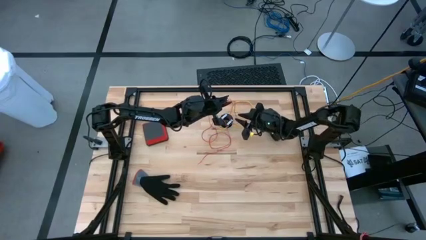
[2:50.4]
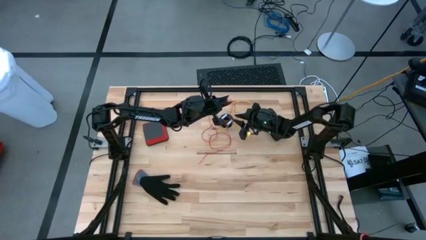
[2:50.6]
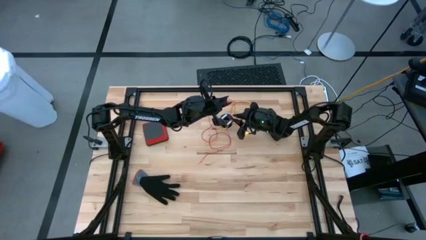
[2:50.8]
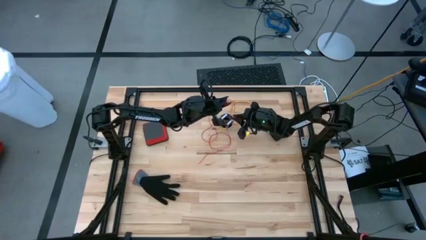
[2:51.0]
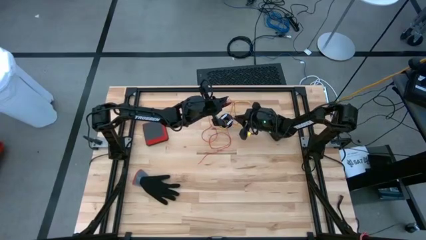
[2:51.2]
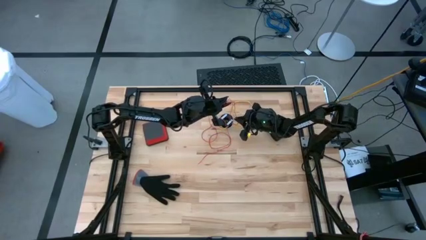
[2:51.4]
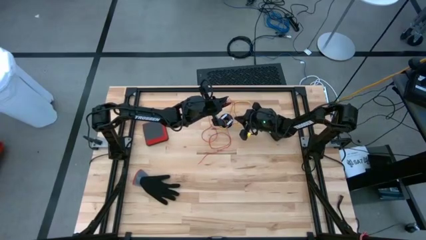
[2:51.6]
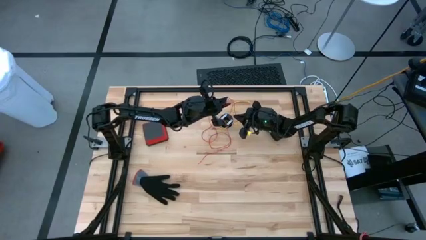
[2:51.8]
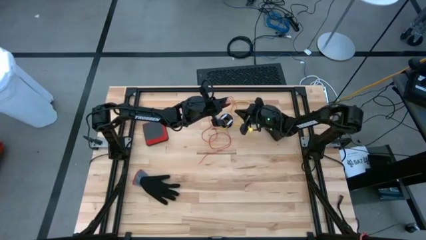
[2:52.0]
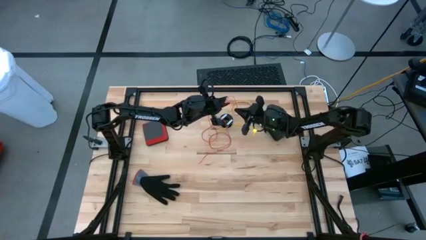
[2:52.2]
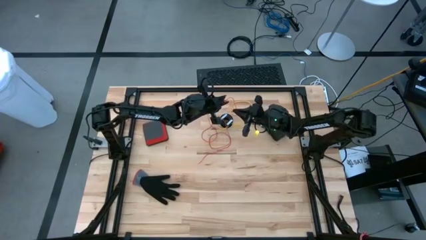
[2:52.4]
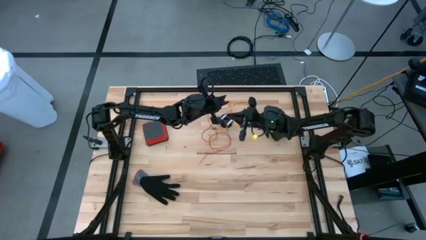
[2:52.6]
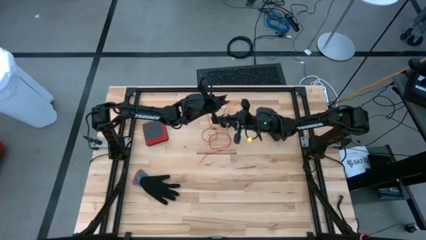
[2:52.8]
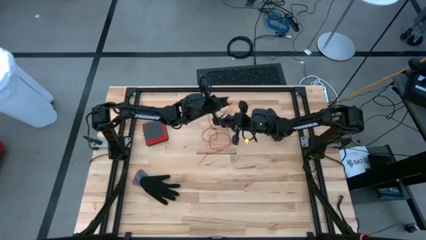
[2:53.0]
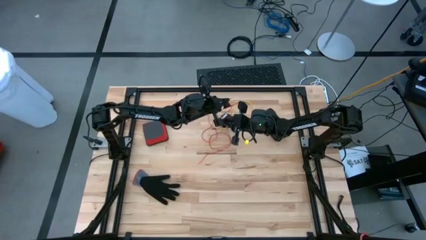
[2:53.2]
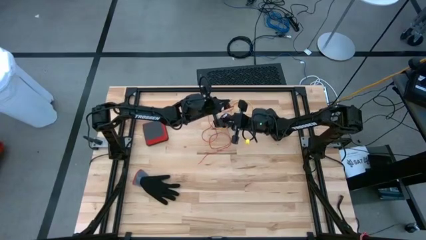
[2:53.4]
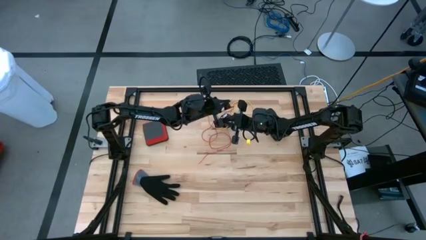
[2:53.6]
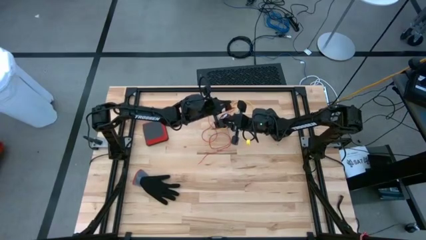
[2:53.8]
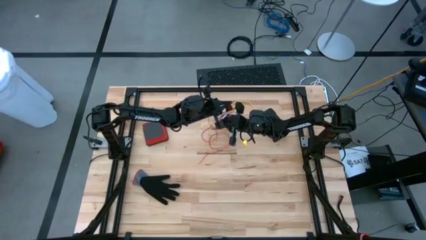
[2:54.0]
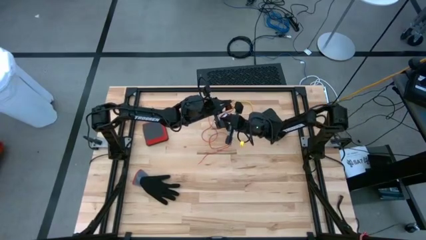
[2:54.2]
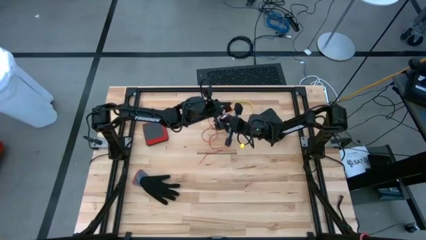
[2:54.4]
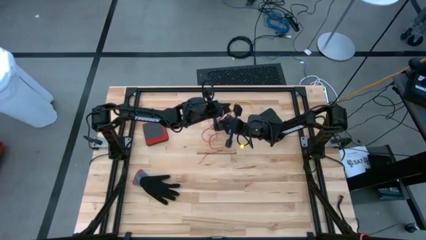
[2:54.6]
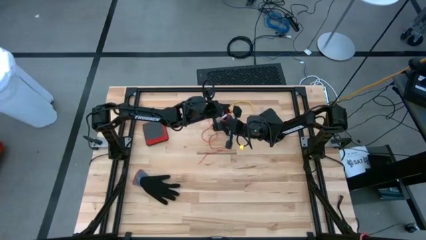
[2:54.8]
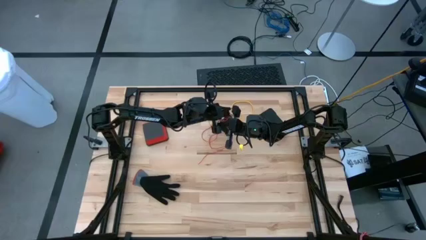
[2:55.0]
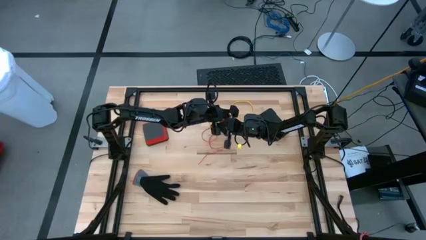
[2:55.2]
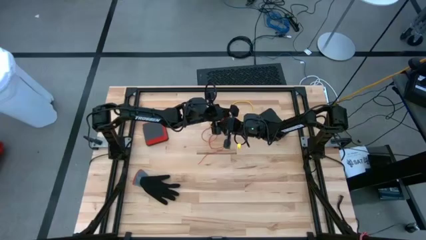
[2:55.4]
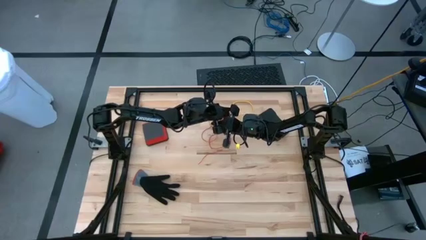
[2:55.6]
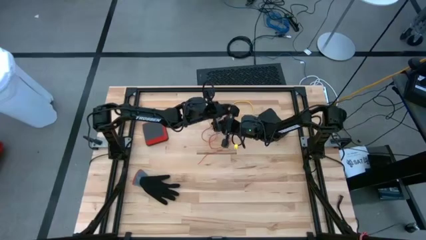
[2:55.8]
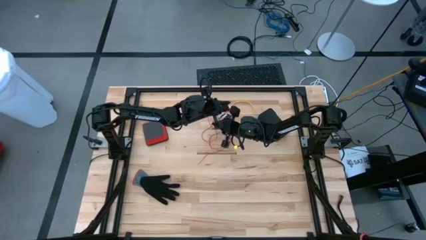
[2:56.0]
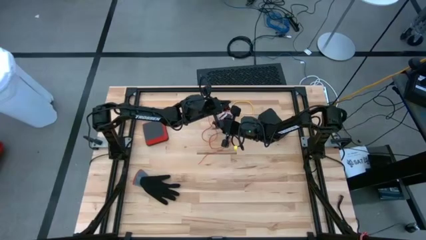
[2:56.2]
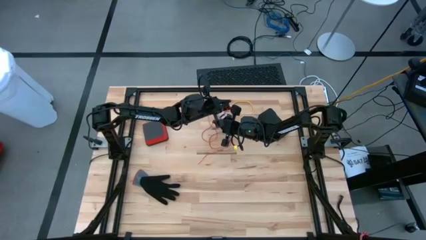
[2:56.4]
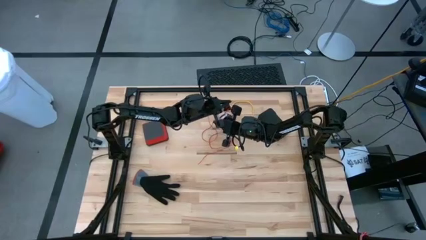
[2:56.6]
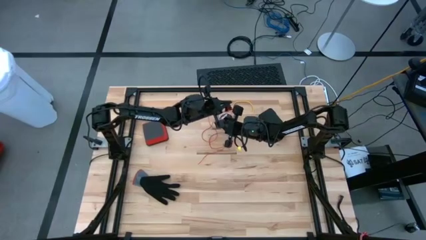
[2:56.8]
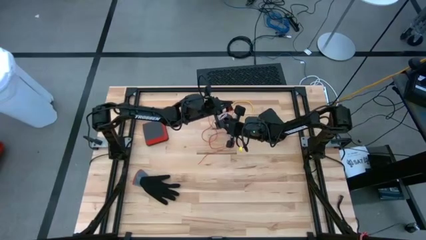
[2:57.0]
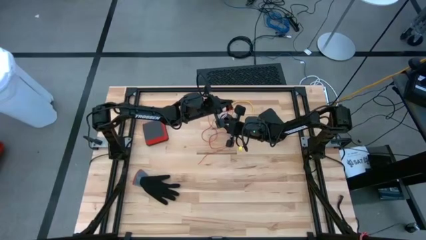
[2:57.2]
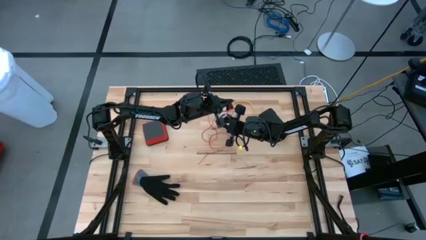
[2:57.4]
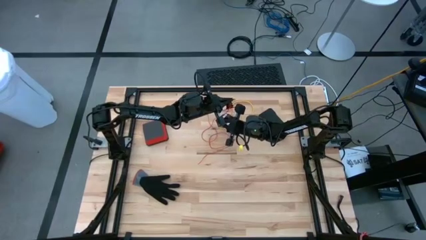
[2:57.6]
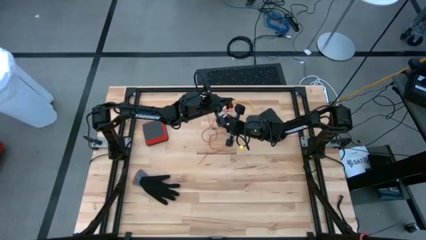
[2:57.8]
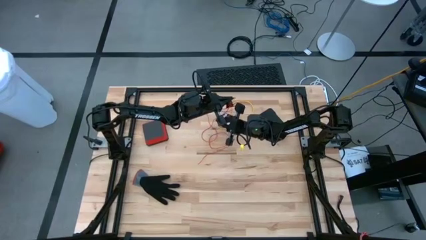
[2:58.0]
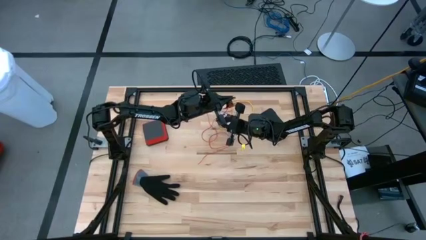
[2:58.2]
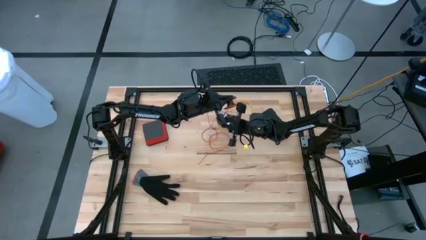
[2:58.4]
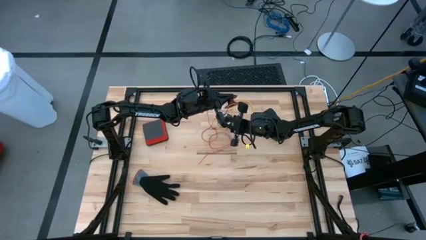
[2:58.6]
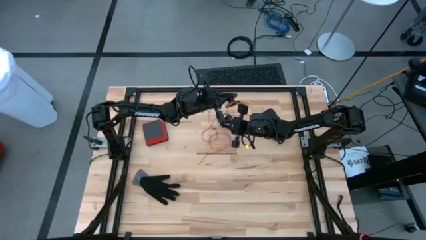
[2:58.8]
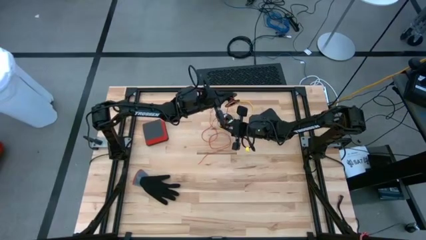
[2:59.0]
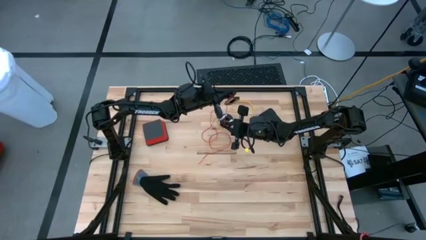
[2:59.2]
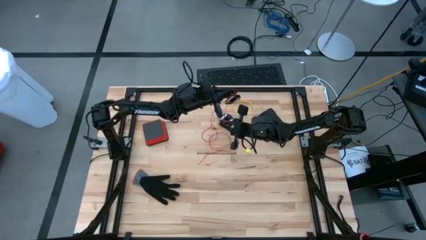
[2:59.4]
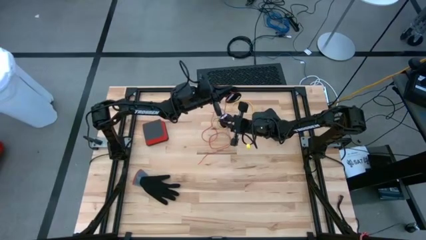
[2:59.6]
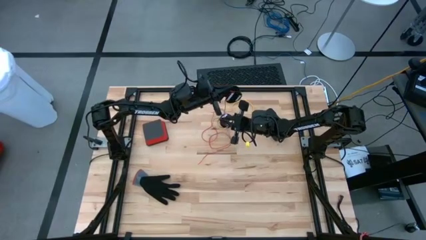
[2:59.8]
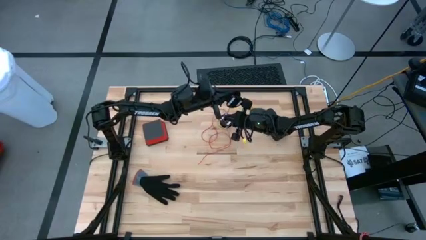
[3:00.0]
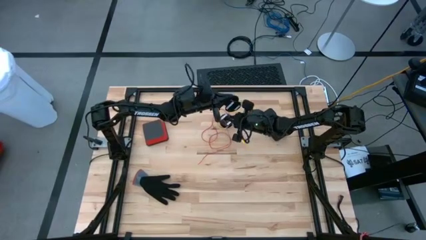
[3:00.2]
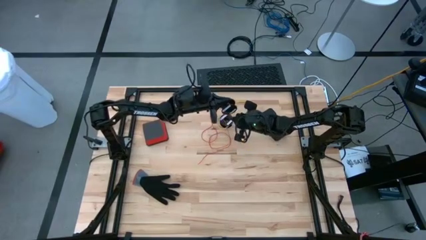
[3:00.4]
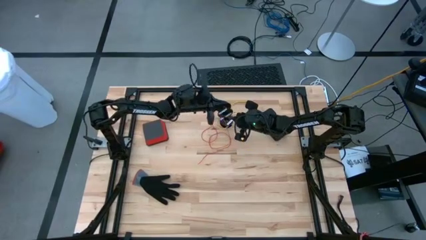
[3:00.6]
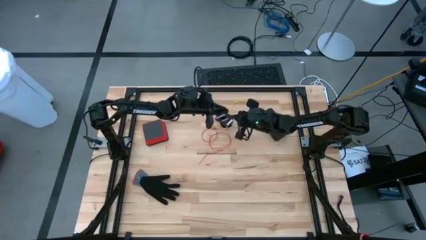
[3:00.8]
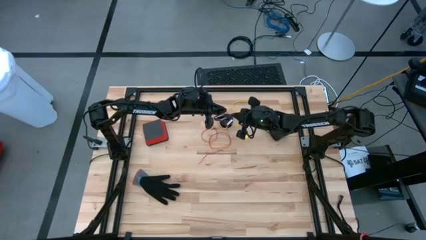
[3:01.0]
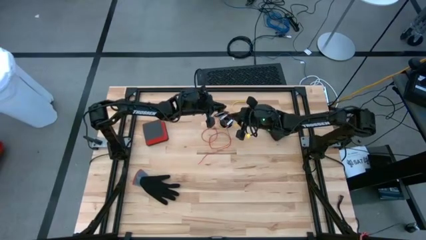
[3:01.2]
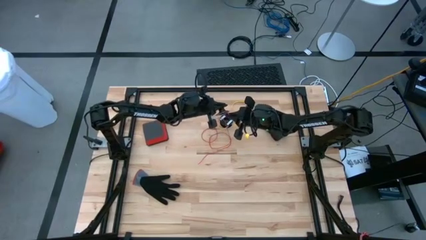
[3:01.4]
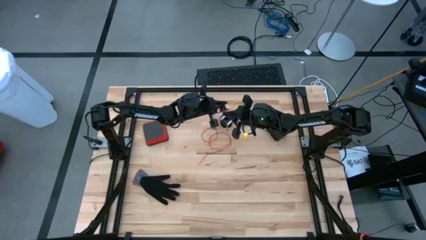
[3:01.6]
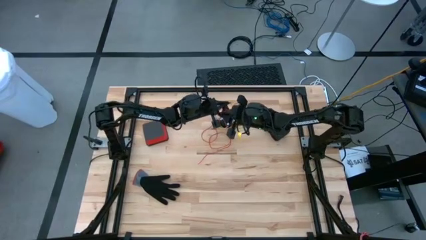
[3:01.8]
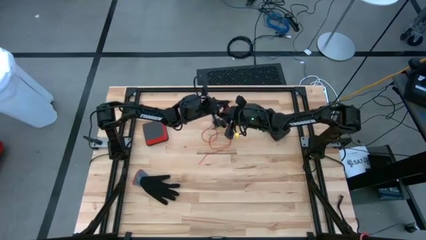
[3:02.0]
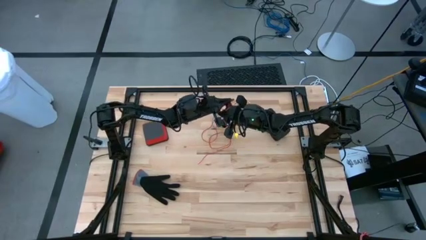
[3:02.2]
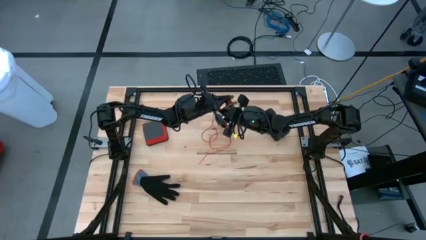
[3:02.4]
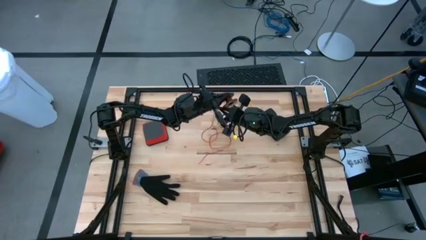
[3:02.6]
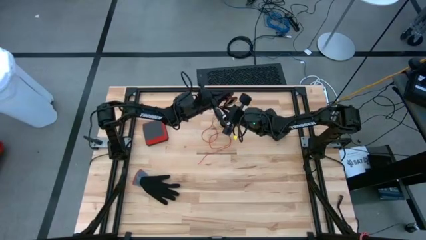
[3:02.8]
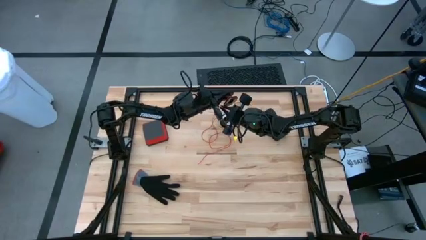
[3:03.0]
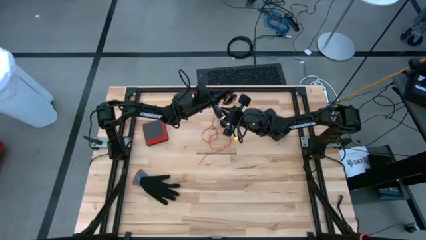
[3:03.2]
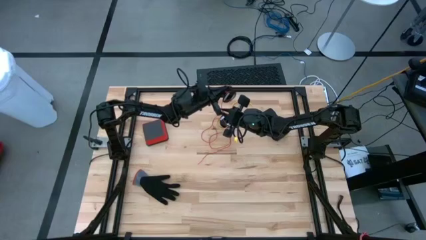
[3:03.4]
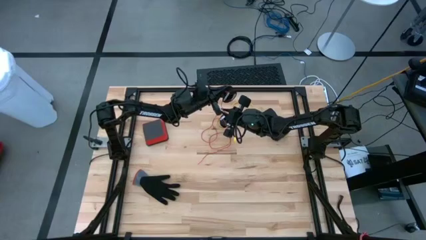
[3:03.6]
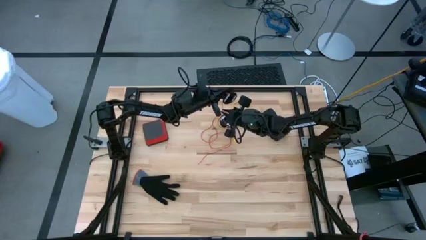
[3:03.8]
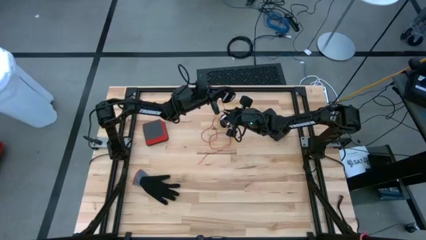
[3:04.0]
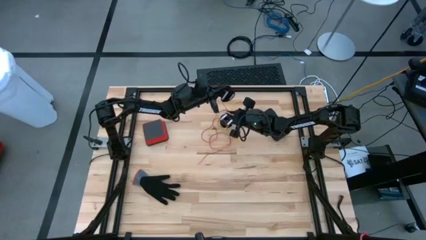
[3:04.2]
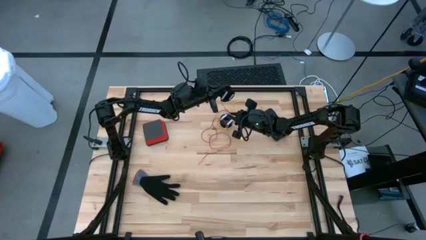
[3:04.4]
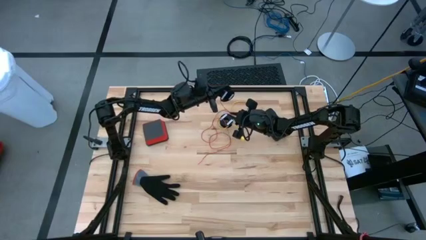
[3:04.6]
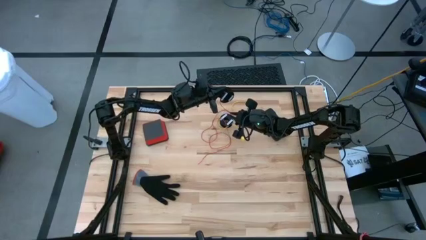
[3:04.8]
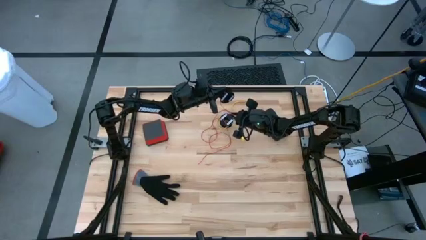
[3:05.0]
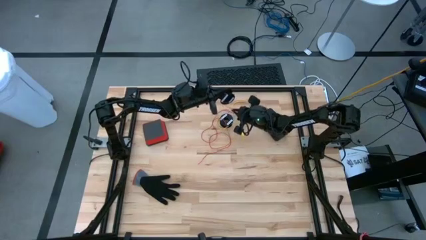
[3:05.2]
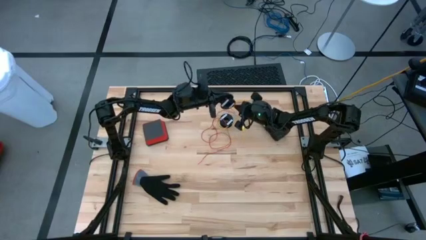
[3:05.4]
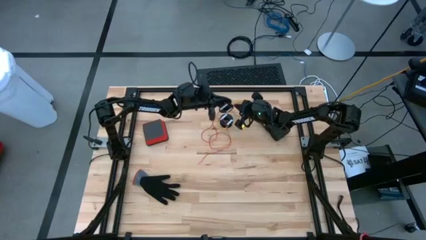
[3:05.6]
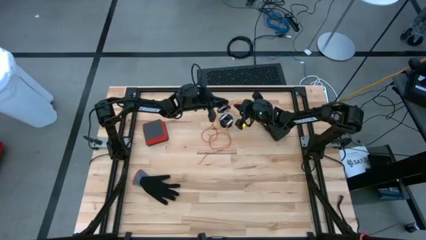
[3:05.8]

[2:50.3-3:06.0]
Task: Coil cords
Coil the red wire into the spool
